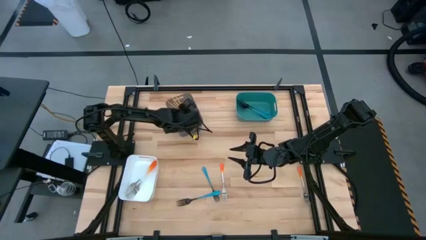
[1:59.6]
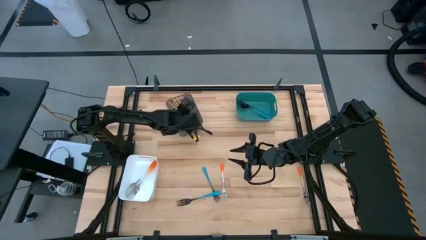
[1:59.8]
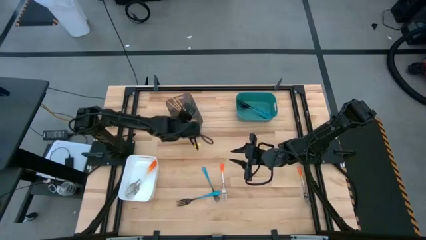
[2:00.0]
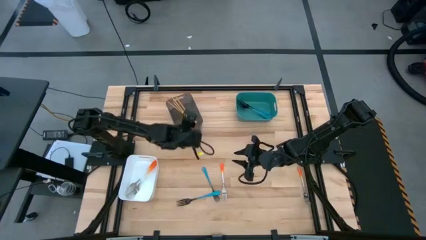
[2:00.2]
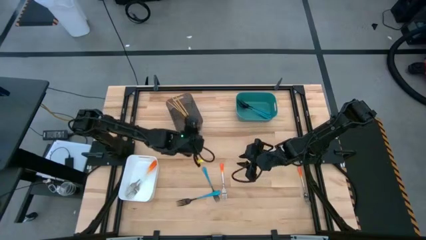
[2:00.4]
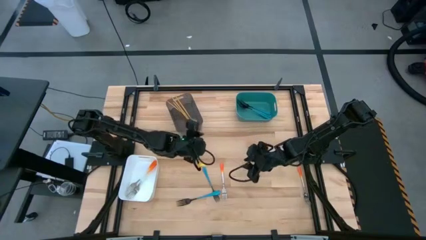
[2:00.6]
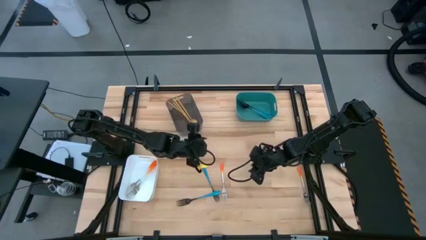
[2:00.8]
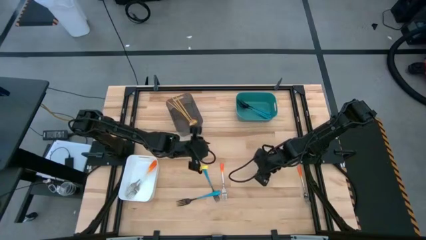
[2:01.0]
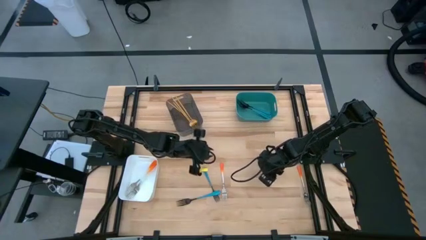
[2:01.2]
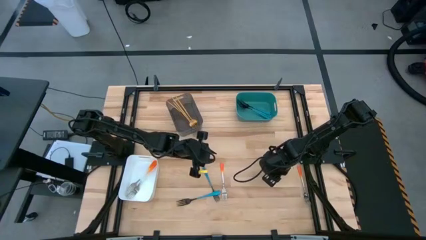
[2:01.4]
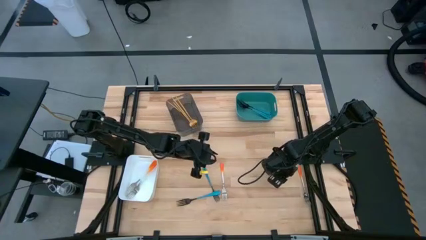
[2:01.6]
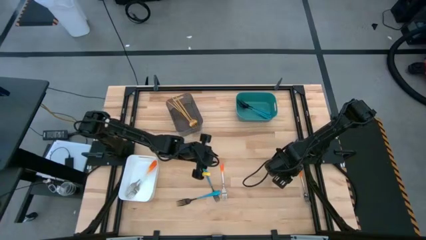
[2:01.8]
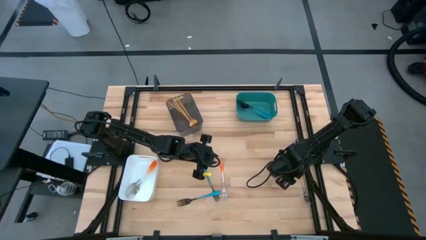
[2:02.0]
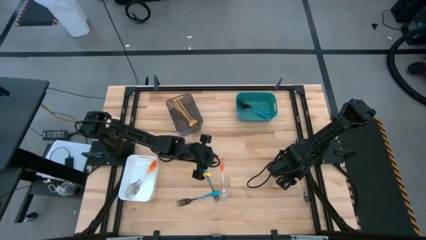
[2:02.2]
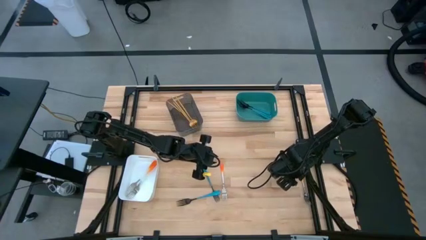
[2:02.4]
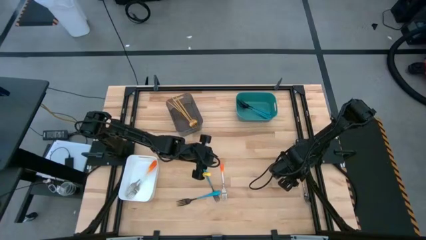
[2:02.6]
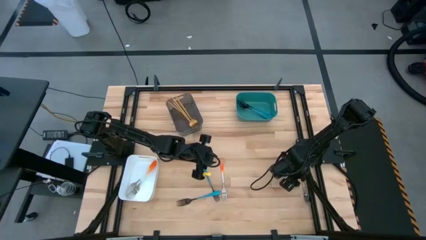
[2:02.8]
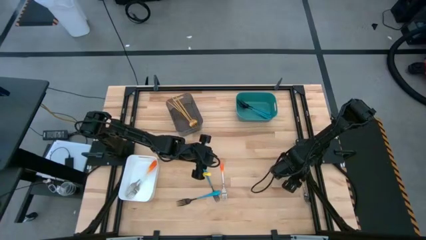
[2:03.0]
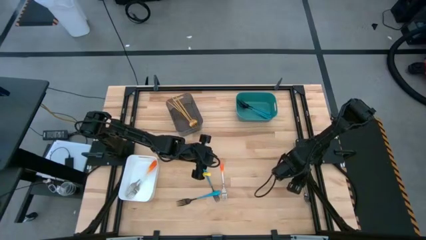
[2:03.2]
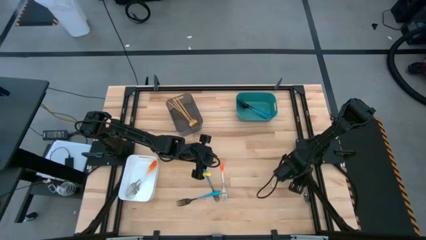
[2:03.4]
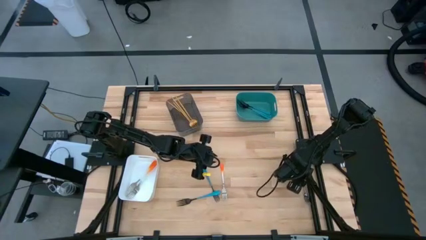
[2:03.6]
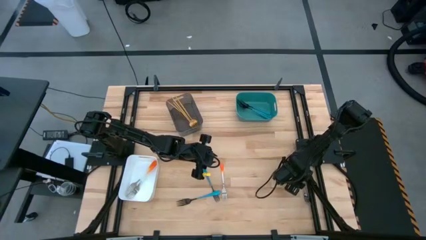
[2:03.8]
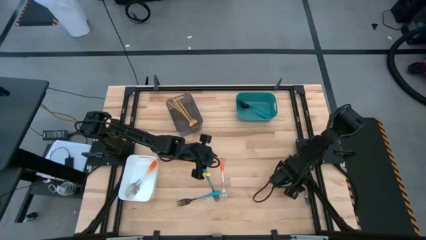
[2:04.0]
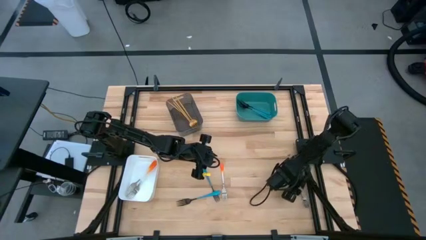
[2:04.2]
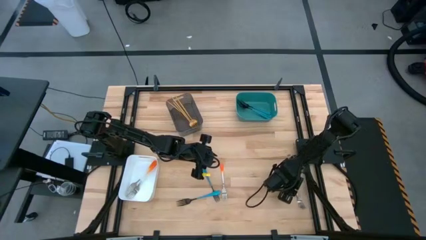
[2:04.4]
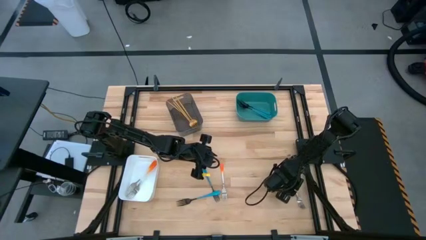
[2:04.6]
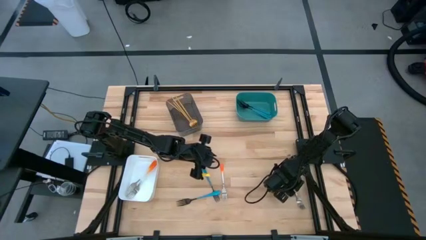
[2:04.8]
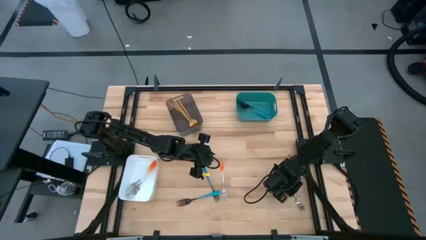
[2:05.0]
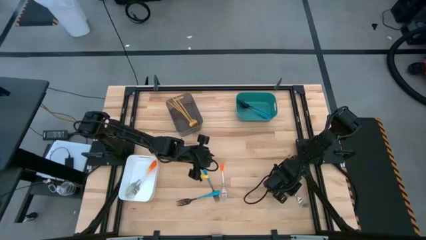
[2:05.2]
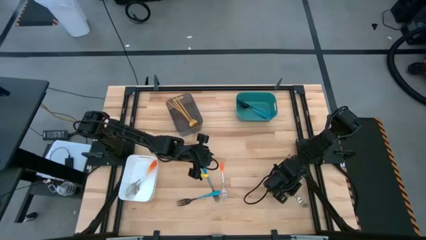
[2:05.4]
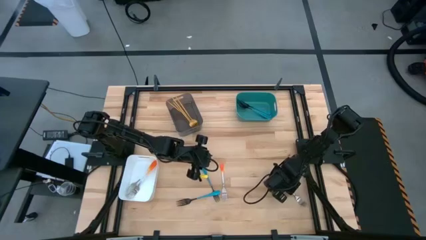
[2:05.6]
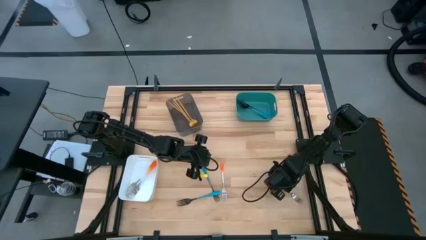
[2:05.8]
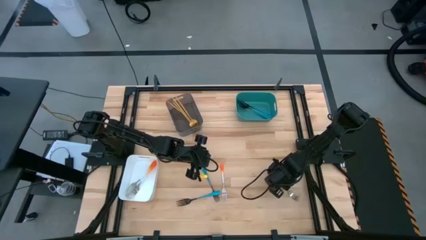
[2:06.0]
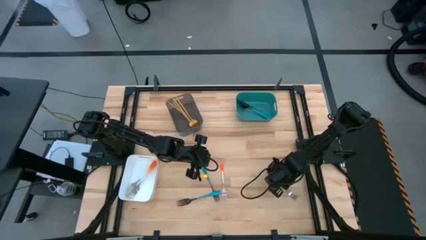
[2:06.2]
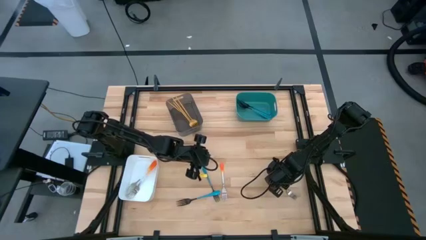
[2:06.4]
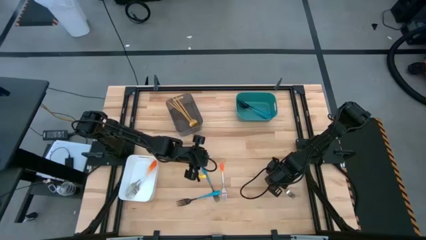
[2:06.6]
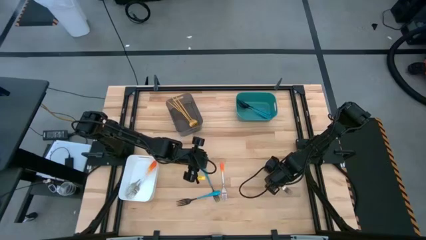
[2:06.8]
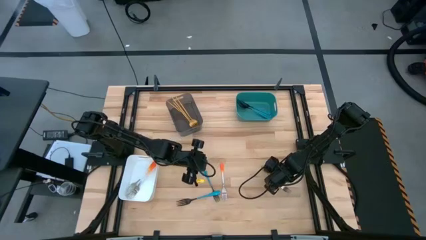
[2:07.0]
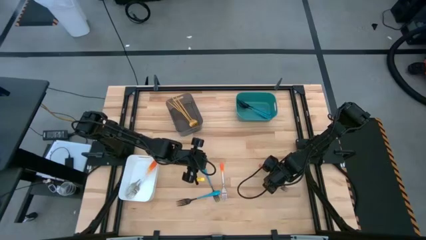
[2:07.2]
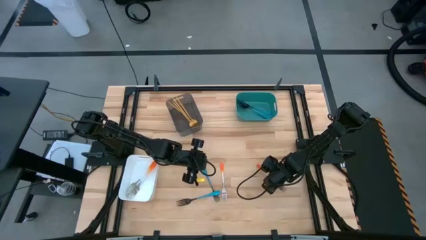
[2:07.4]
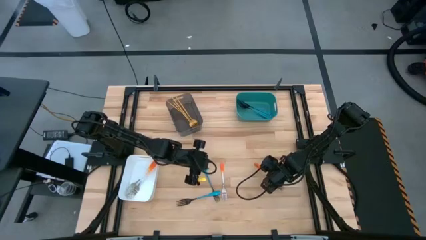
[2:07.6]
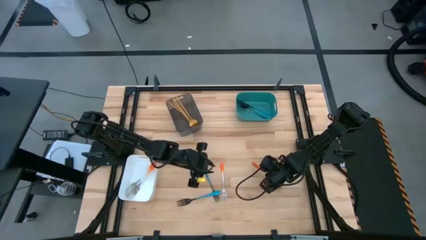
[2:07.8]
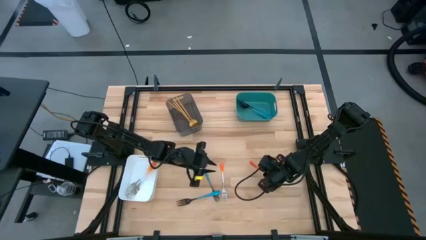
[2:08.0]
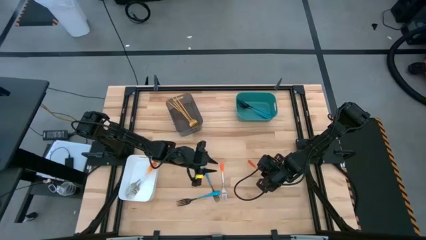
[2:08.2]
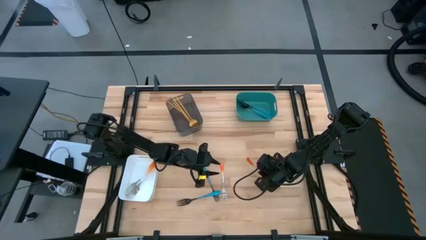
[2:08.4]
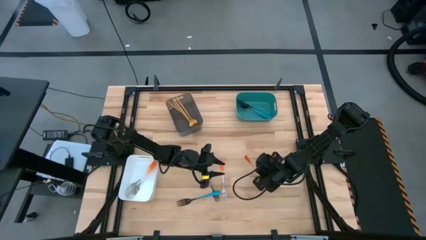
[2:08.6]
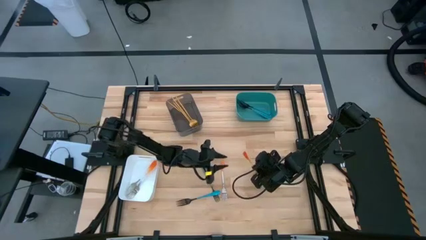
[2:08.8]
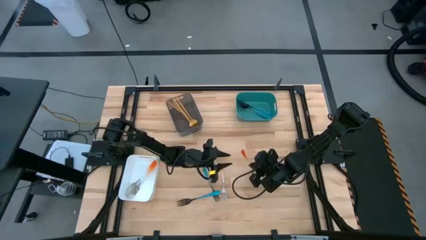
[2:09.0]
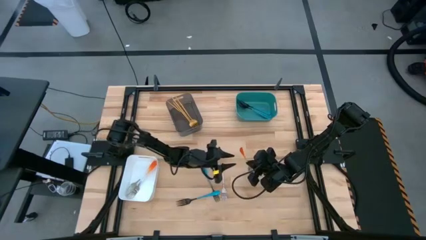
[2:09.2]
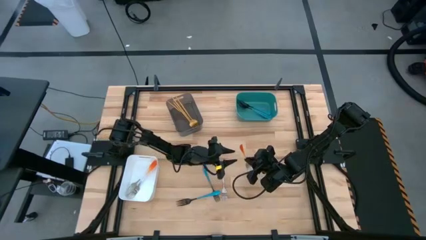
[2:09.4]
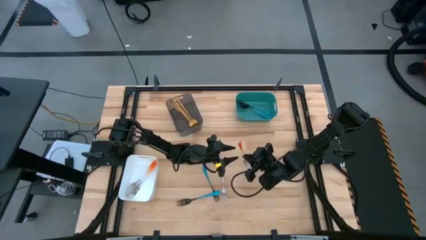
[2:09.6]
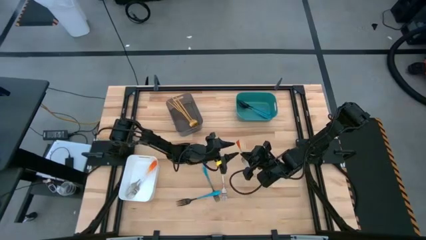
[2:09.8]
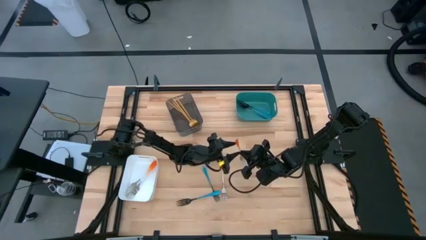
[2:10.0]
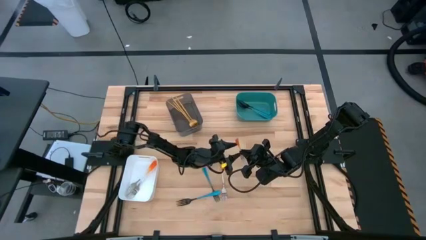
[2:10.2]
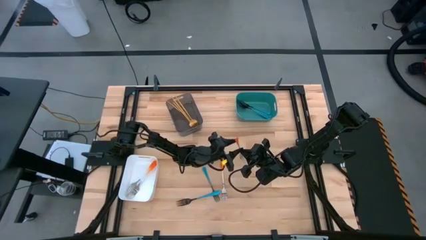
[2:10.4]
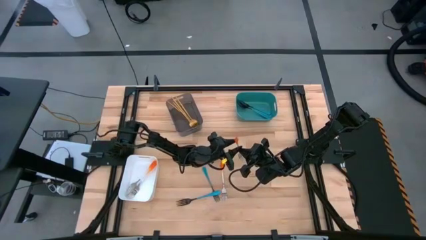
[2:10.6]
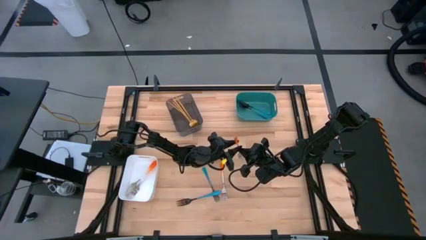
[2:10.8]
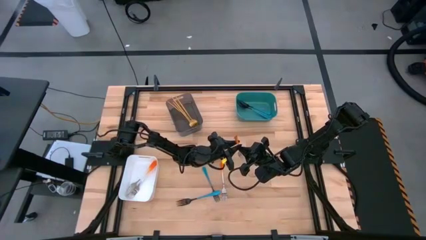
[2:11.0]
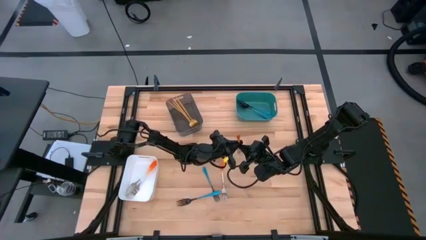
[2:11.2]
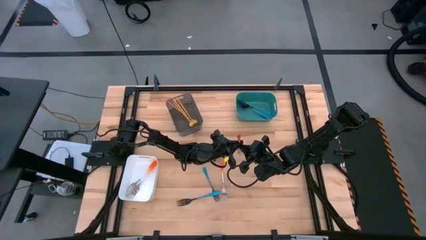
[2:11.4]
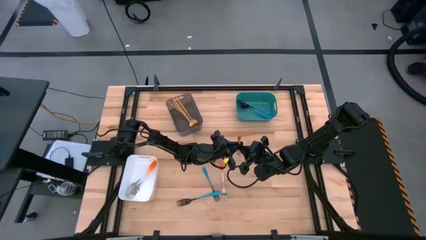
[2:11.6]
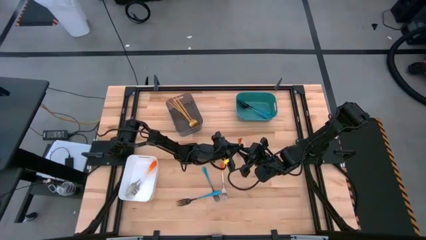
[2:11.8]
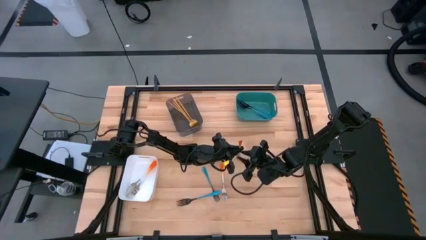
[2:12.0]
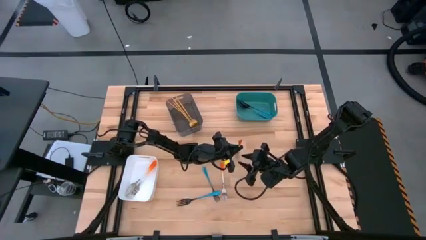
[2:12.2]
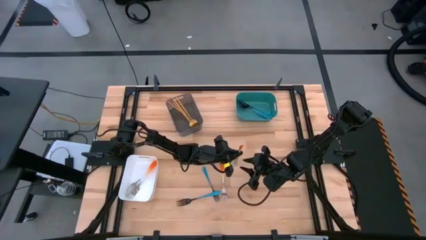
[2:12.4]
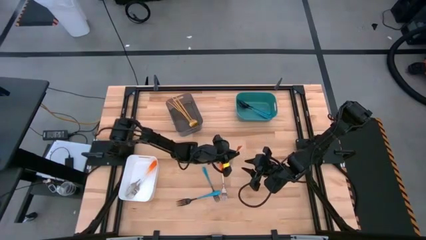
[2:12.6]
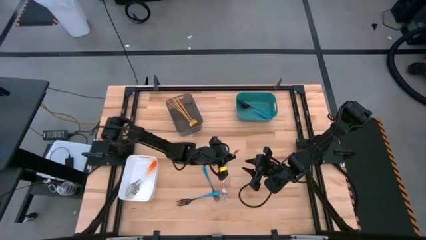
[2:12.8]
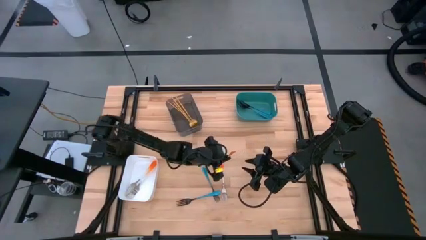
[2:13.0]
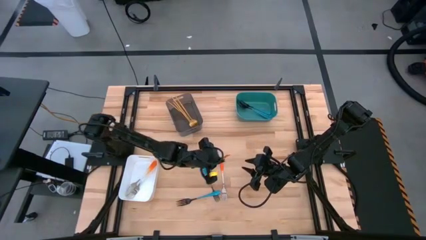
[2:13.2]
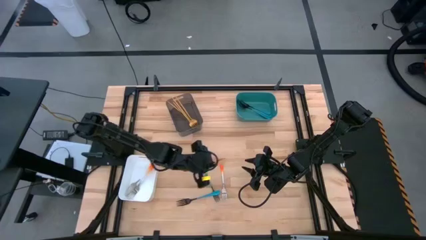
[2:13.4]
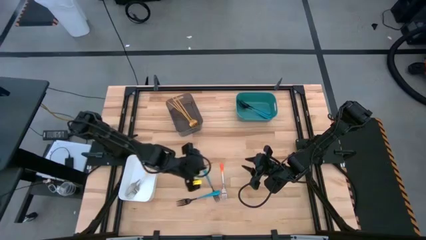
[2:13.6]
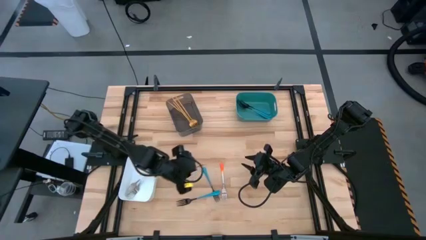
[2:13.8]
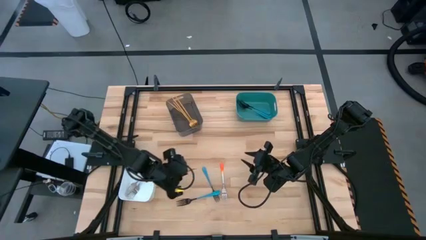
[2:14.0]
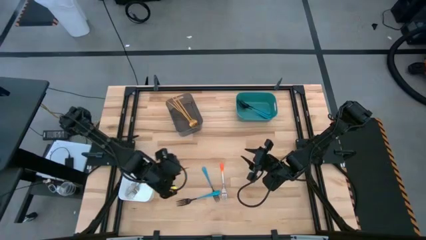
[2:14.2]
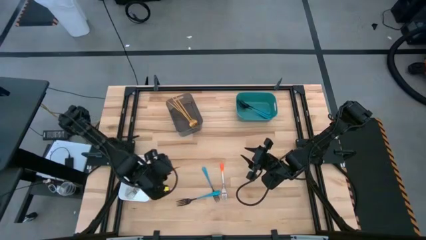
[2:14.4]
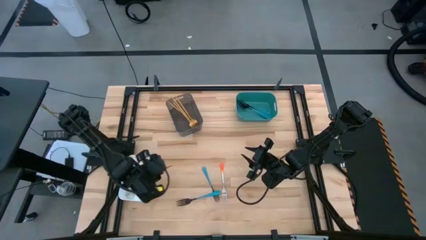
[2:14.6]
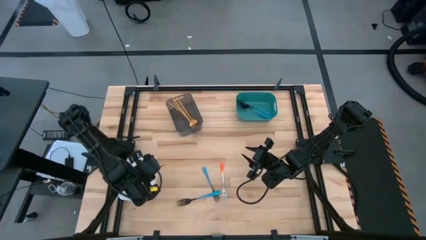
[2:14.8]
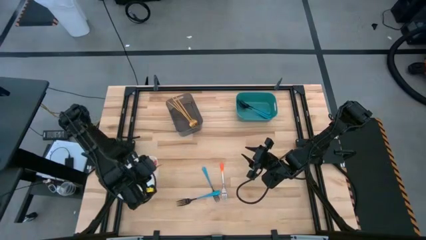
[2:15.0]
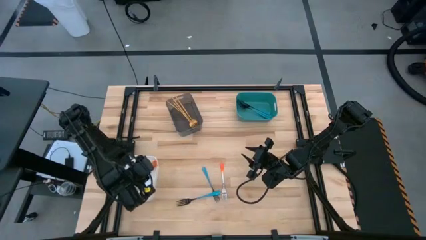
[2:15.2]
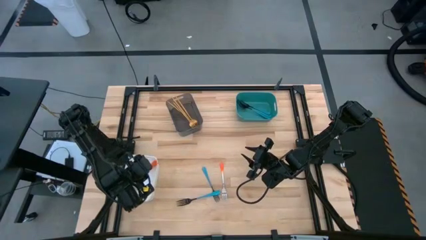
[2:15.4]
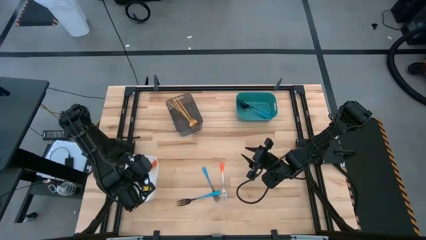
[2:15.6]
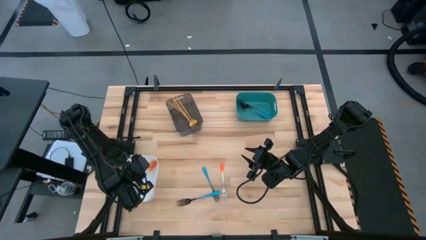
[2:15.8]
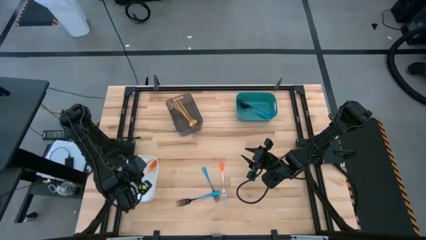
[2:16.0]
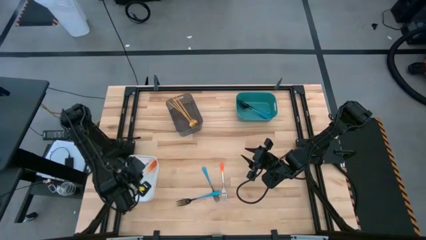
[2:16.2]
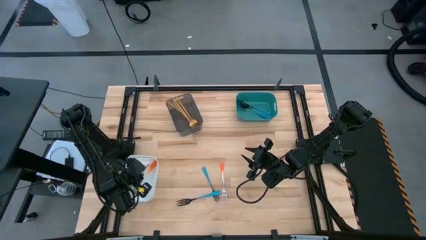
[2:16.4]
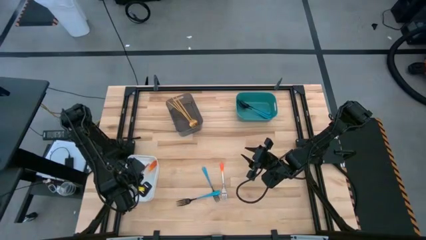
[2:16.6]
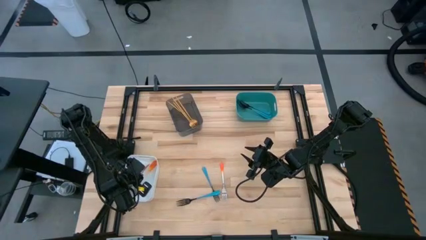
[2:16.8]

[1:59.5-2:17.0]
Task: Sort silverware by color (type)
Put the orange fork into the white bin
